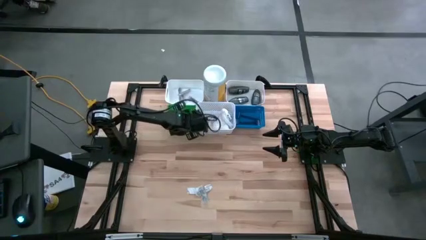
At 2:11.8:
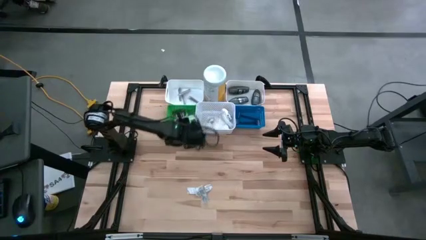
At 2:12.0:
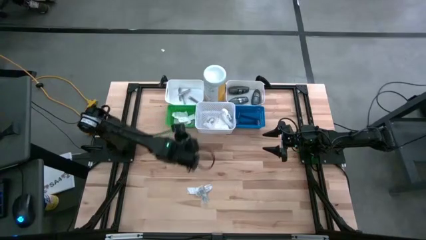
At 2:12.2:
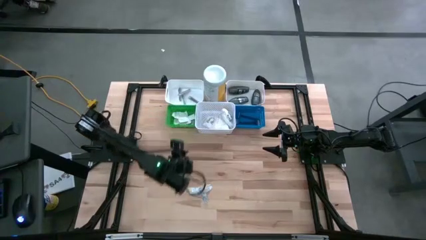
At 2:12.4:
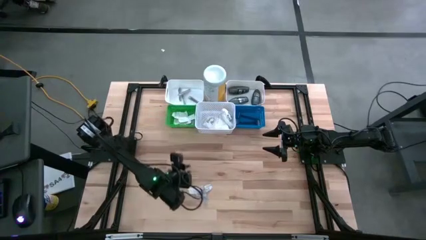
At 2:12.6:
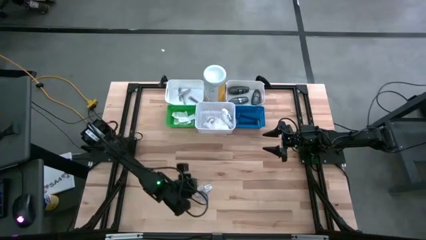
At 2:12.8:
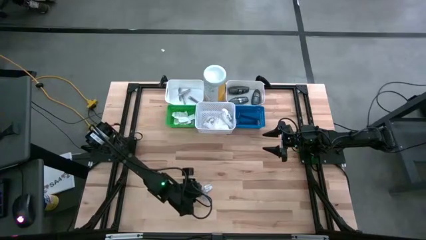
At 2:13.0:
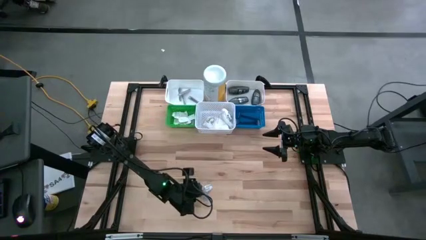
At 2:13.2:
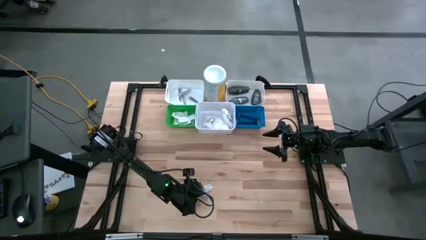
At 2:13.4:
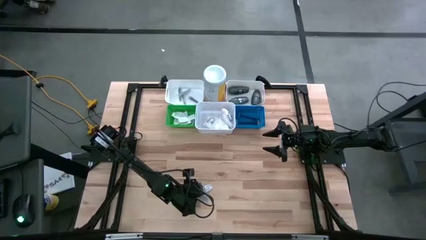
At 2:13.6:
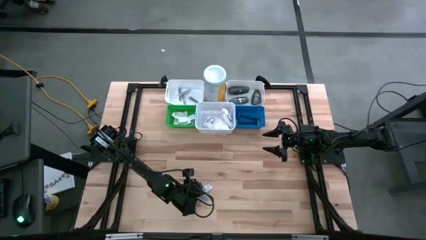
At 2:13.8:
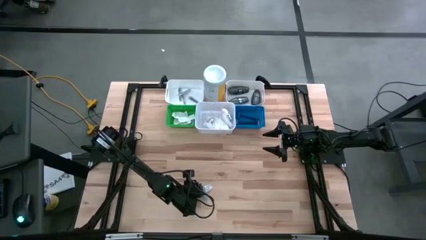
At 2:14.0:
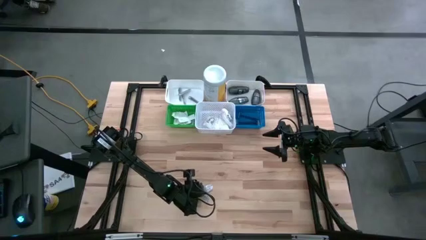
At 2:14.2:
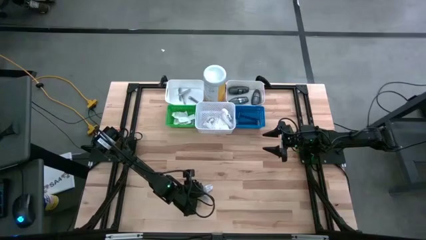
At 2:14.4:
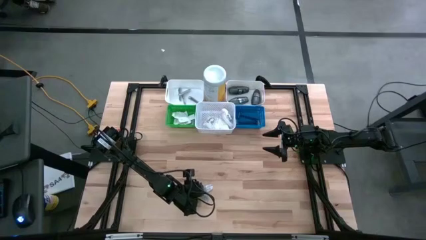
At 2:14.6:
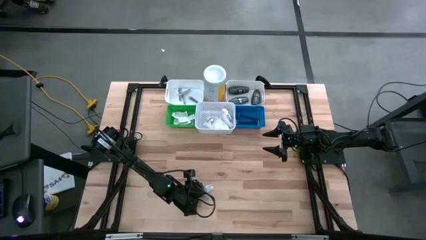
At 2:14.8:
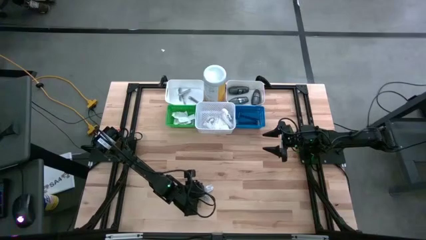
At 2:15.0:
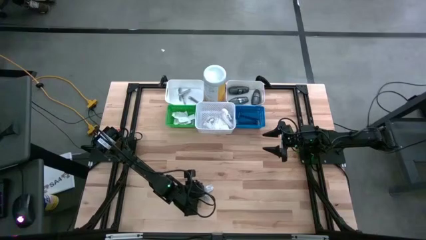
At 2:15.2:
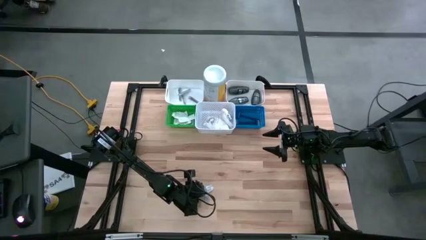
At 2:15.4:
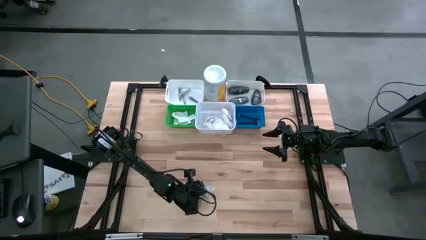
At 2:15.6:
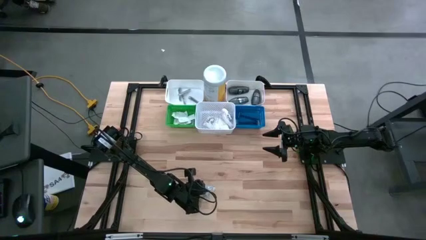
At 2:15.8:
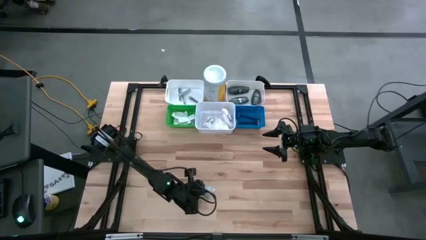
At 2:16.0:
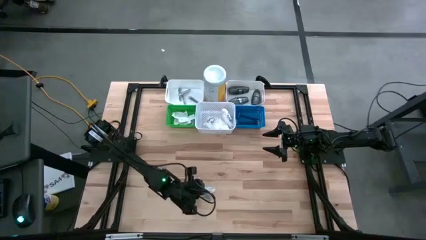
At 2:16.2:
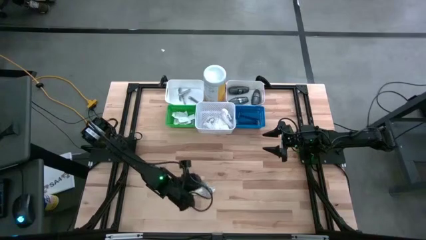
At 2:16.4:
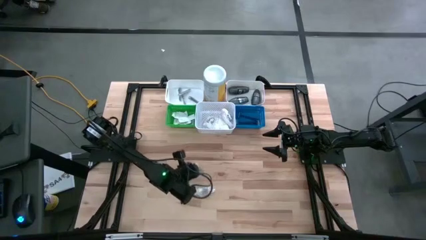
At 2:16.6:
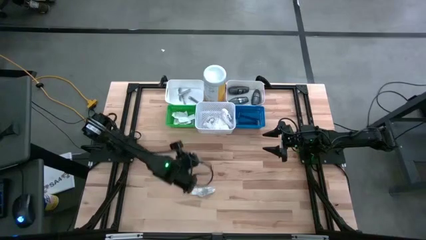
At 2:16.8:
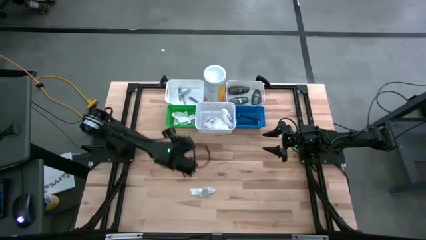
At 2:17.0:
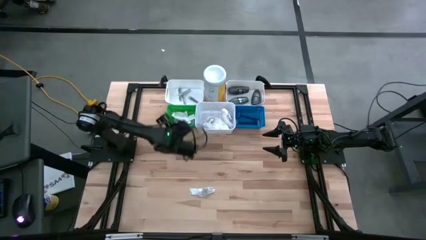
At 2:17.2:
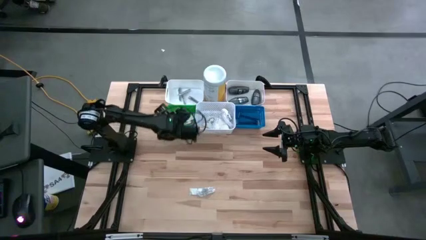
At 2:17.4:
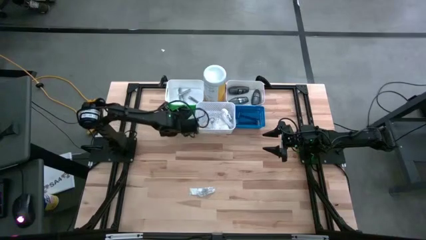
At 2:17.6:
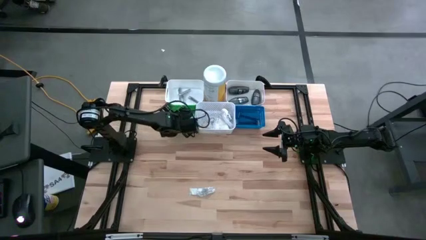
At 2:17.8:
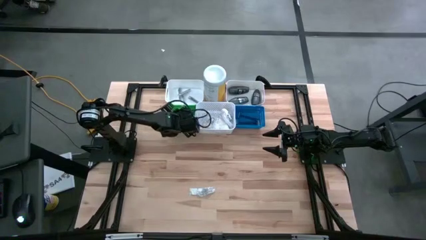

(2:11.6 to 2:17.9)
Task: Pick & Place Travel size toiletries
Put the white bandage into the green bin

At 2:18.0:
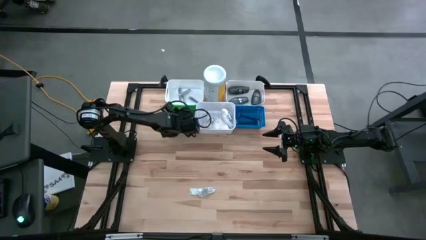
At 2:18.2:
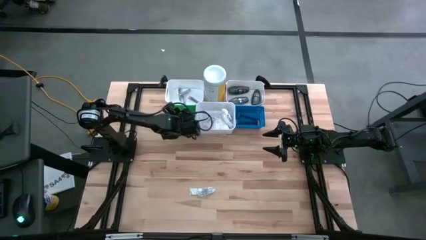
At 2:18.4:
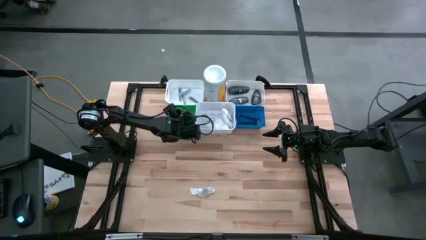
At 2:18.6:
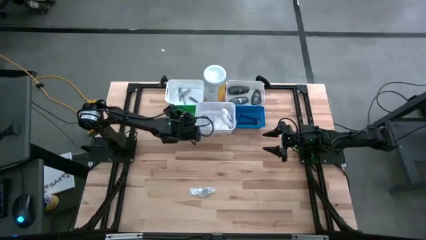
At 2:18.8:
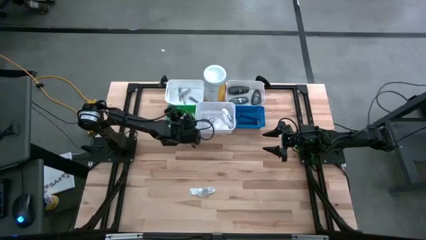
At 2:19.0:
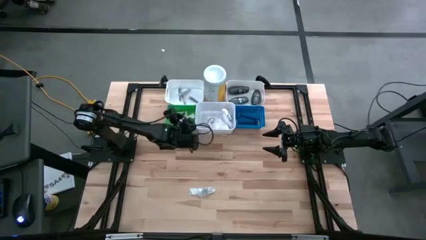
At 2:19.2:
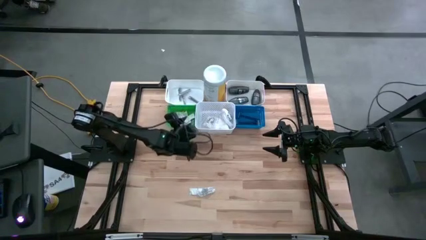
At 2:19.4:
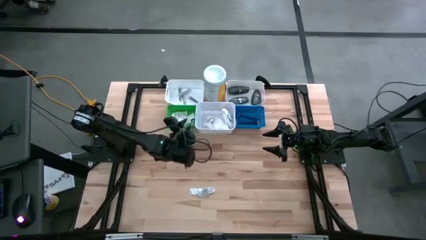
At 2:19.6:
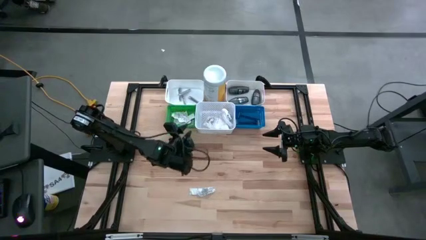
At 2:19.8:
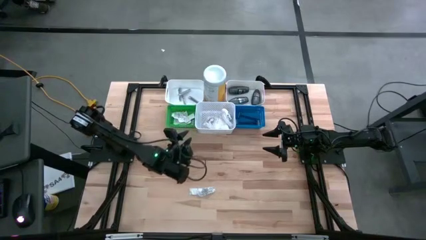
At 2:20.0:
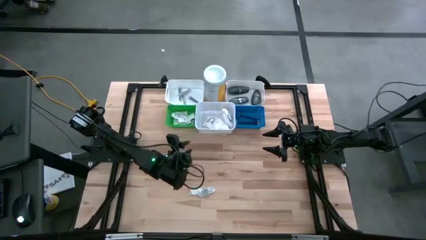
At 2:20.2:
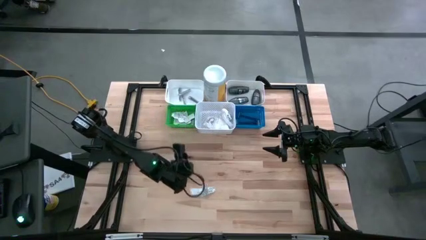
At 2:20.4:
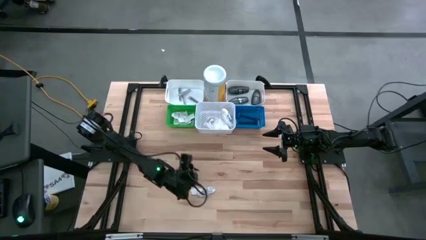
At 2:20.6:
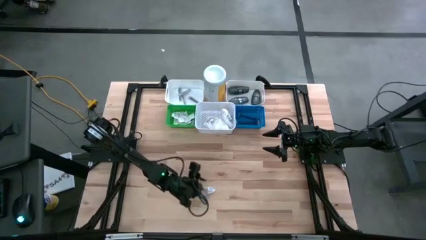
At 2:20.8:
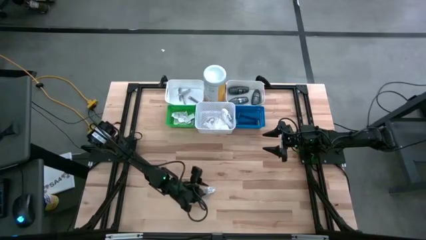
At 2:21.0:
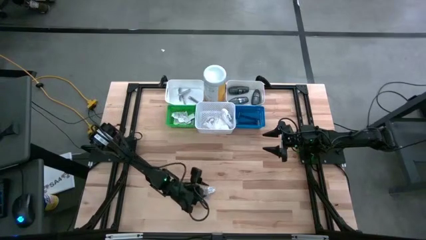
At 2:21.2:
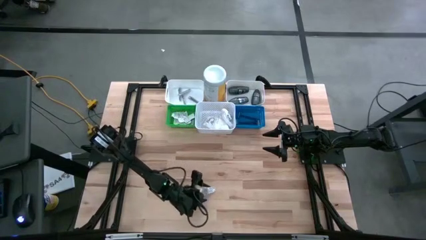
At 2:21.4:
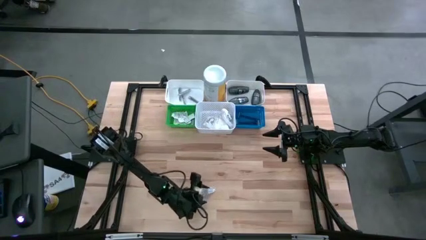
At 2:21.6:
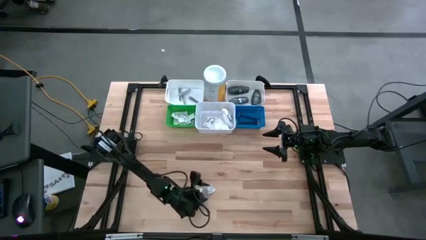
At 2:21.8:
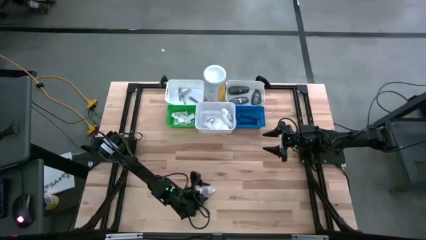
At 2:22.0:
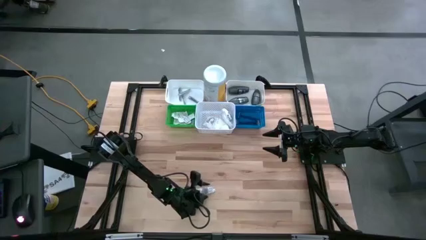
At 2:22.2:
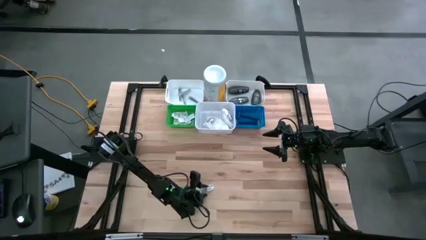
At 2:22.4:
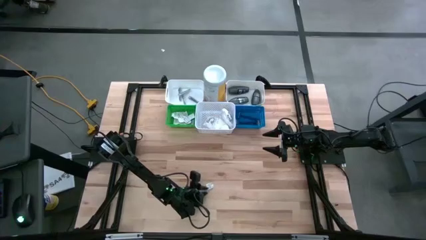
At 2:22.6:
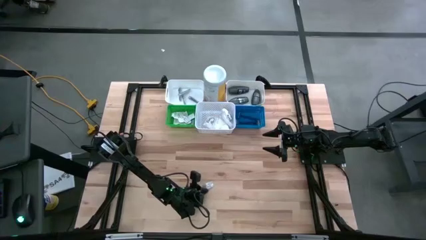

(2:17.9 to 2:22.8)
Put the white bandage into the green bin

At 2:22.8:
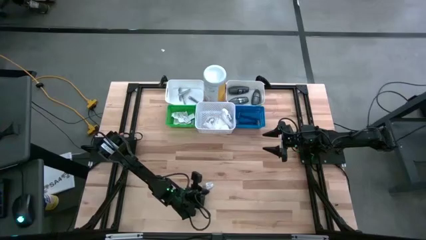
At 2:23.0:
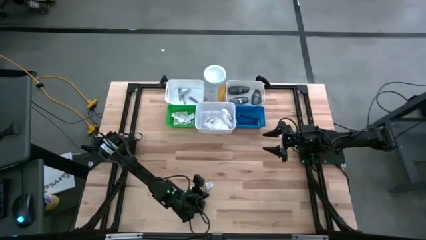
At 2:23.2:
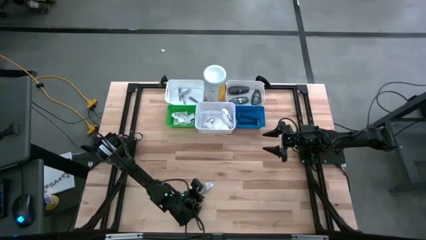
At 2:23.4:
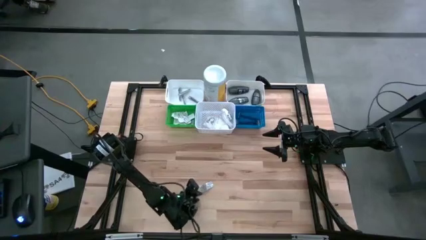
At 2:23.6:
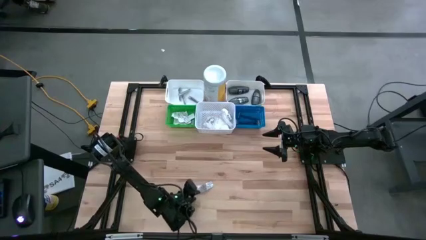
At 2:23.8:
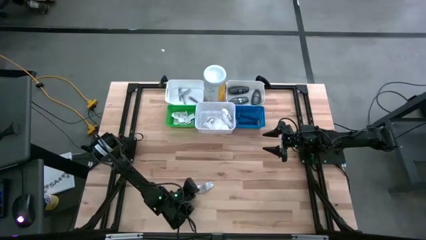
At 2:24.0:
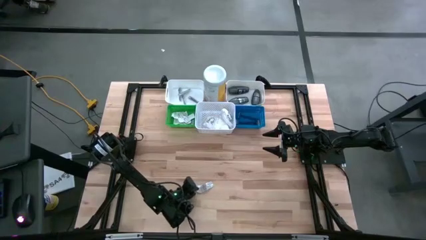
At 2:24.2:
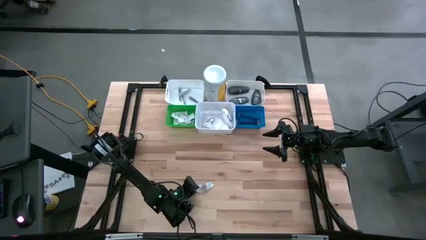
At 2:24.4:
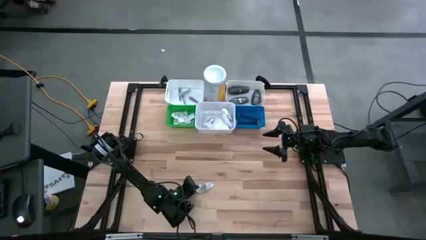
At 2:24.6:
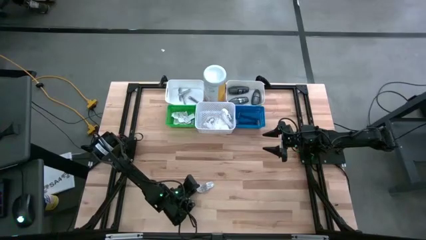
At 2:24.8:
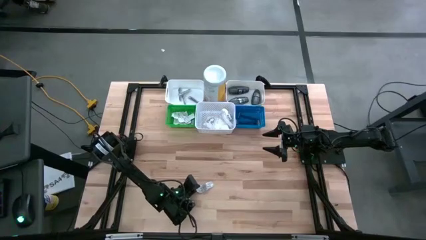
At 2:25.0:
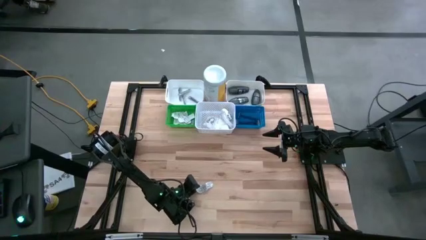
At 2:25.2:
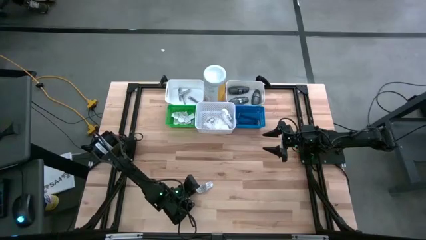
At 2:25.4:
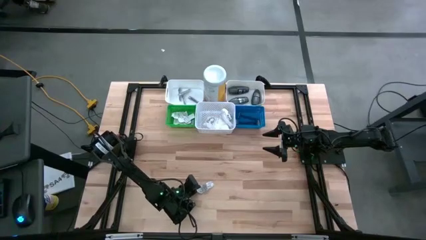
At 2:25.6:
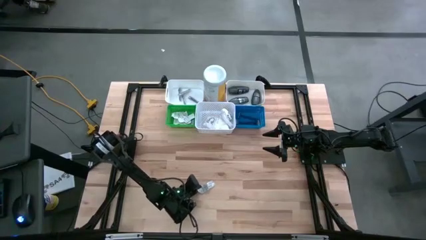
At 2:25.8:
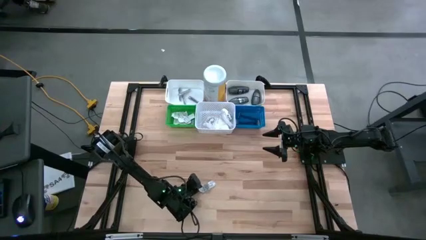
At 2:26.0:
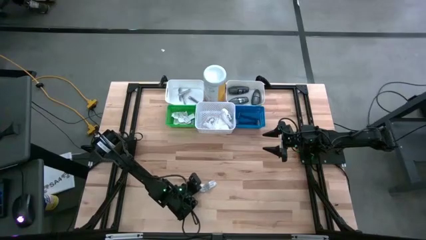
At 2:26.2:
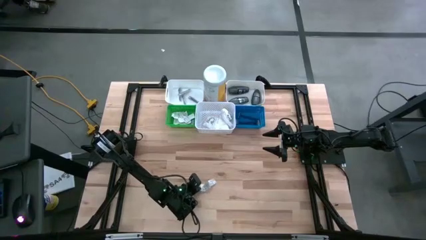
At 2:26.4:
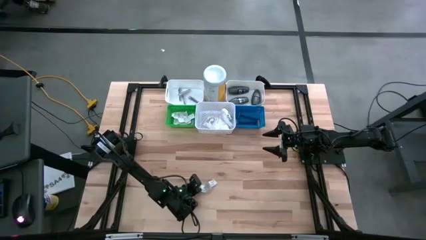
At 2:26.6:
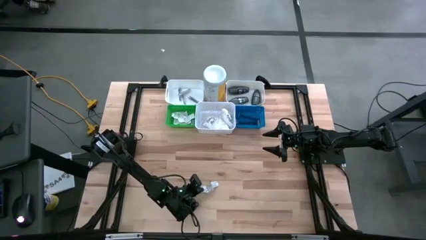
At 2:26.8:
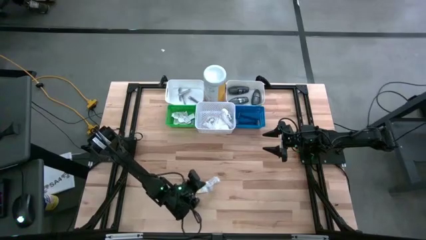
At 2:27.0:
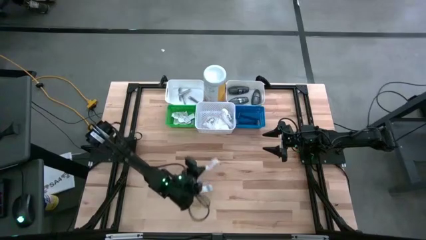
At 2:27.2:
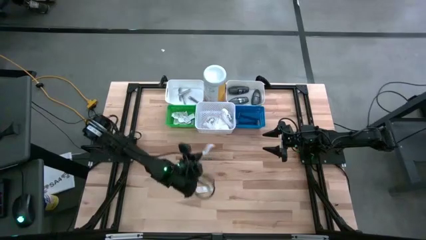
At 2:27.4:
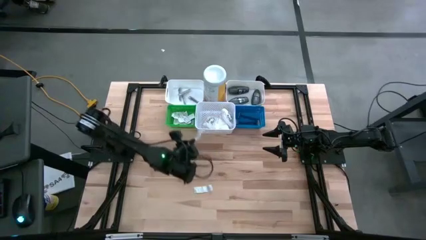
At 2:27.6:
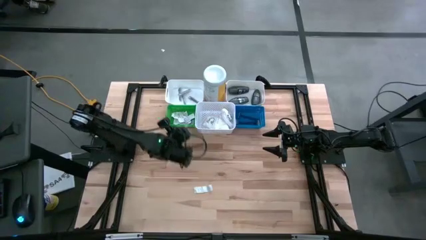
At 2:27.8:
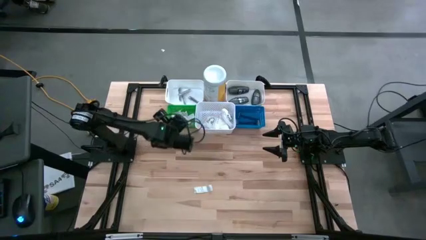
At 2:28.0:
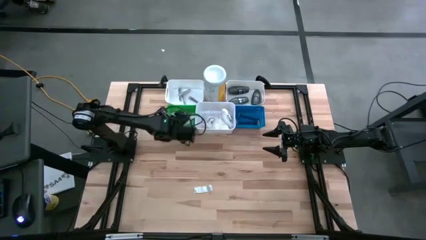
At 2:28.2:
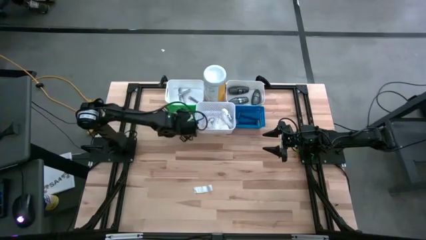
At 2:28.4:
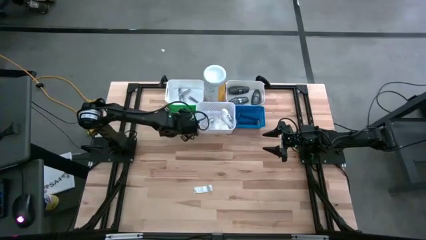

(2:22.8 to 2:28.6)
Put the white bandage into the green bin
